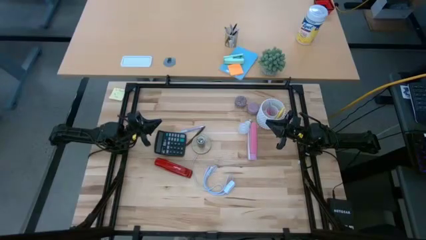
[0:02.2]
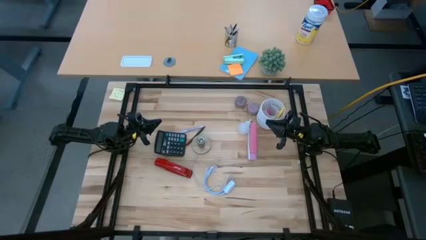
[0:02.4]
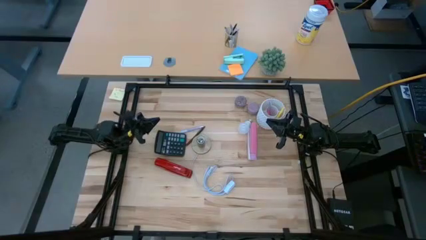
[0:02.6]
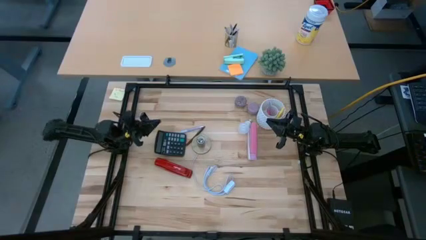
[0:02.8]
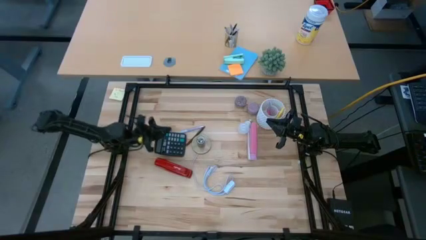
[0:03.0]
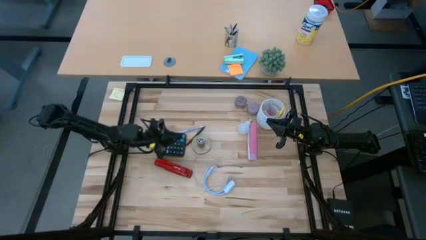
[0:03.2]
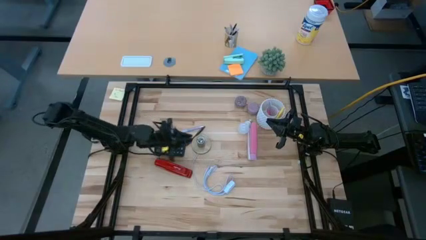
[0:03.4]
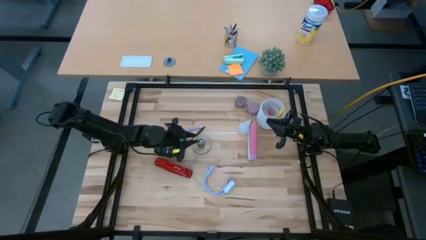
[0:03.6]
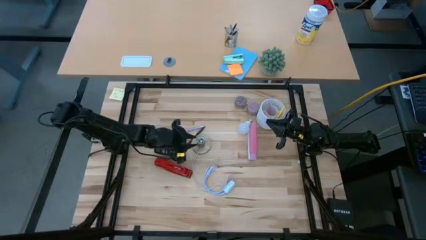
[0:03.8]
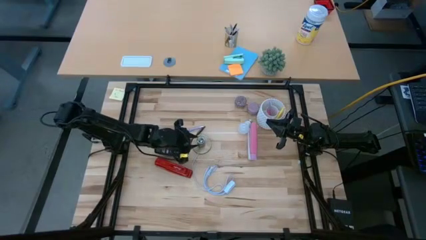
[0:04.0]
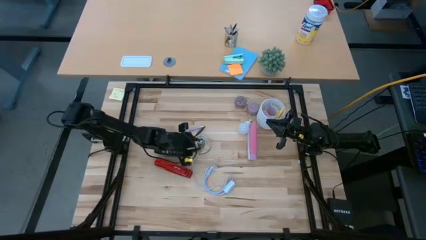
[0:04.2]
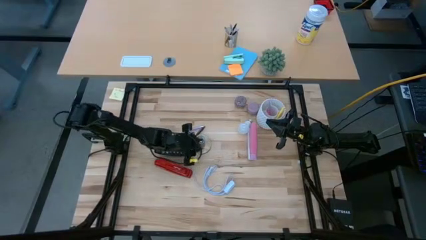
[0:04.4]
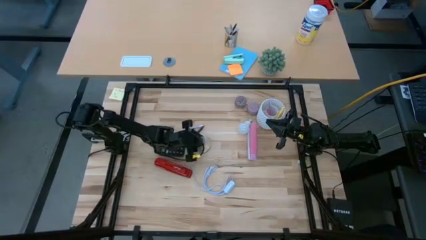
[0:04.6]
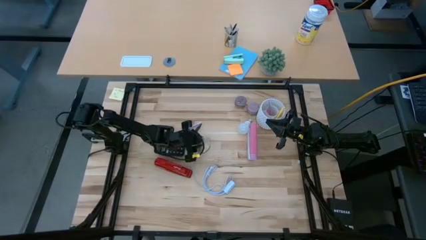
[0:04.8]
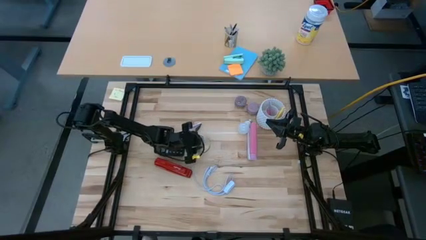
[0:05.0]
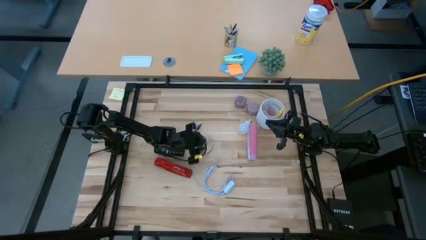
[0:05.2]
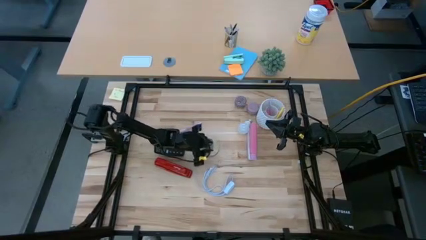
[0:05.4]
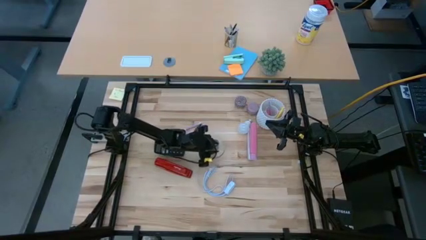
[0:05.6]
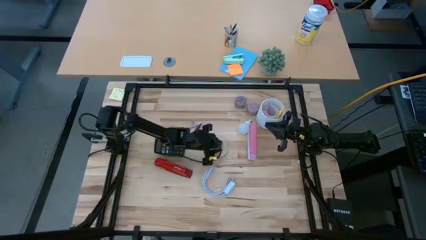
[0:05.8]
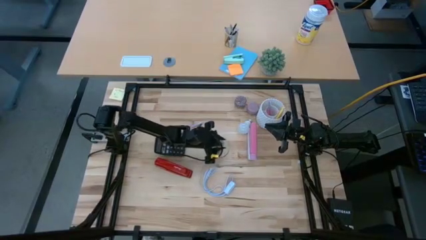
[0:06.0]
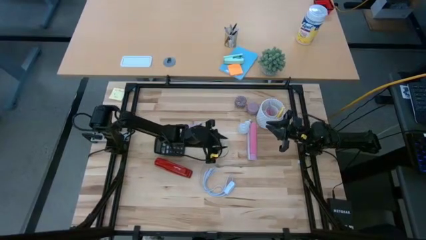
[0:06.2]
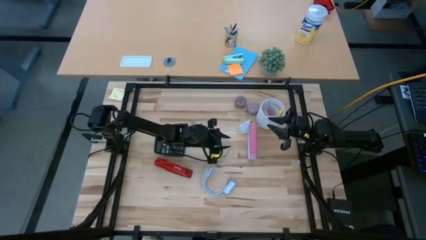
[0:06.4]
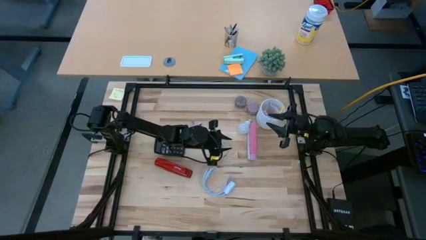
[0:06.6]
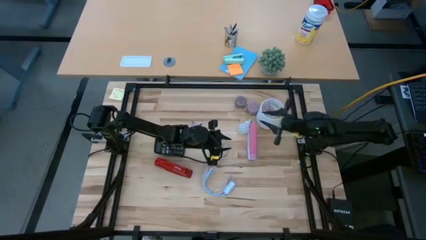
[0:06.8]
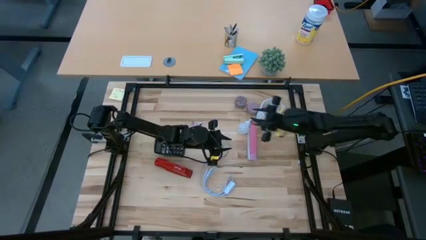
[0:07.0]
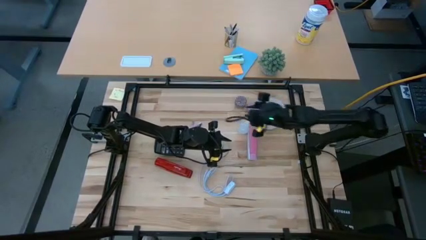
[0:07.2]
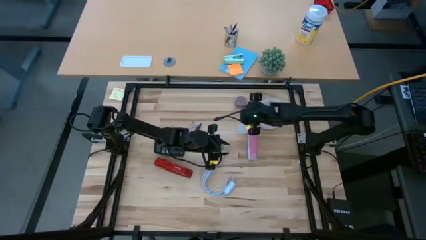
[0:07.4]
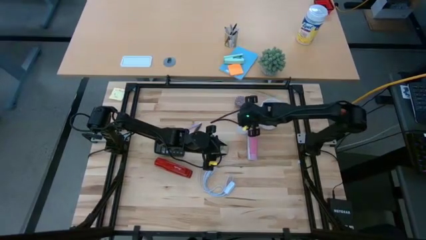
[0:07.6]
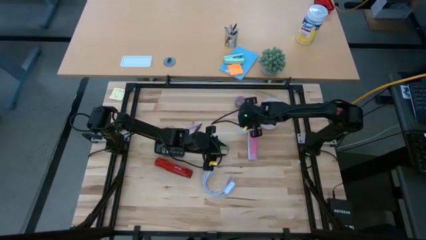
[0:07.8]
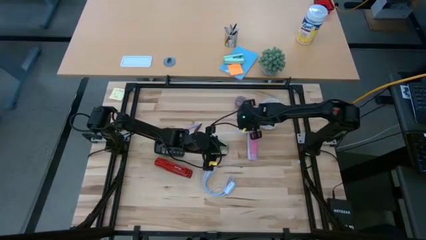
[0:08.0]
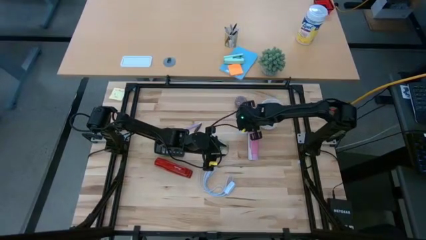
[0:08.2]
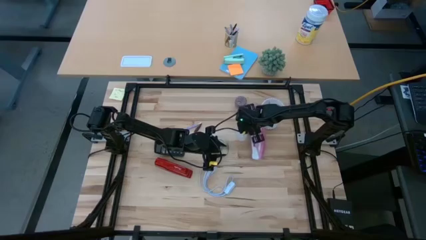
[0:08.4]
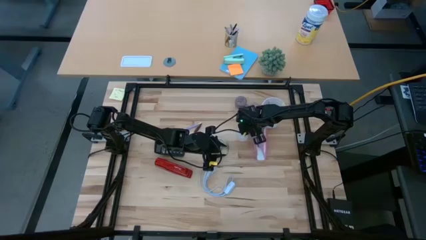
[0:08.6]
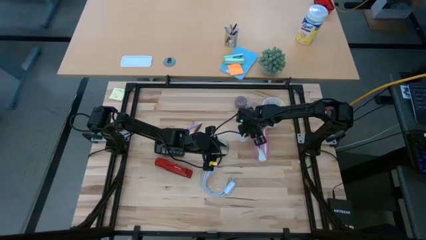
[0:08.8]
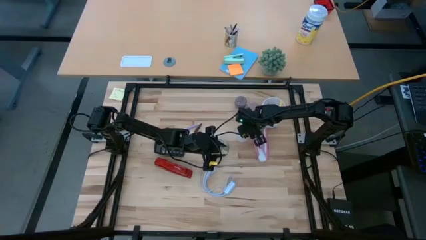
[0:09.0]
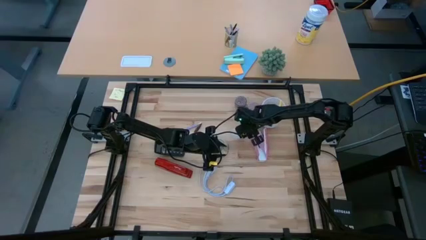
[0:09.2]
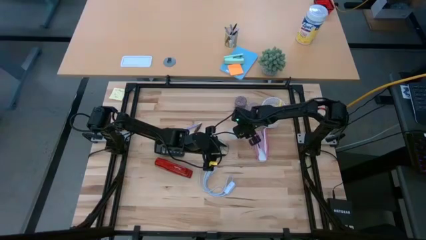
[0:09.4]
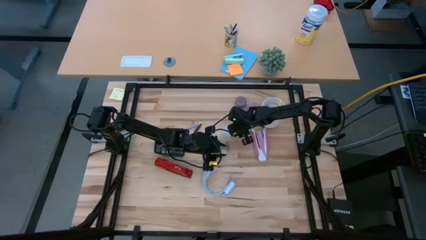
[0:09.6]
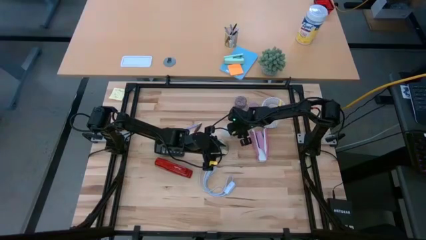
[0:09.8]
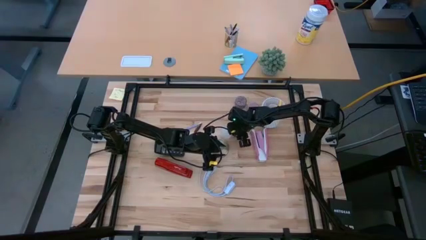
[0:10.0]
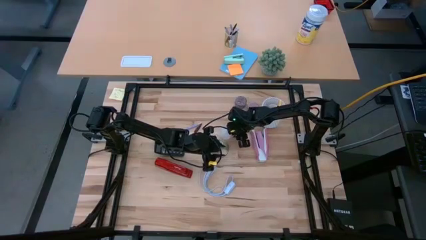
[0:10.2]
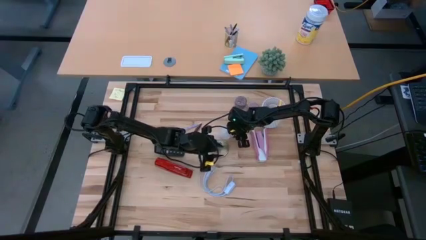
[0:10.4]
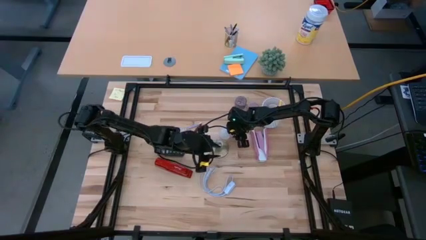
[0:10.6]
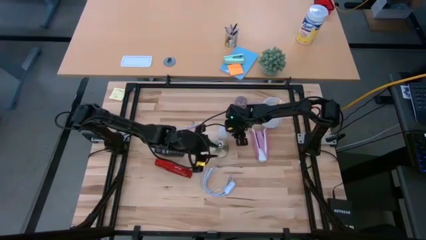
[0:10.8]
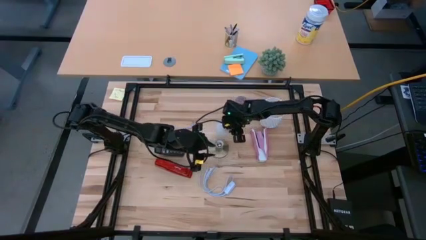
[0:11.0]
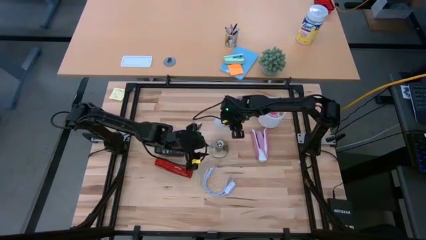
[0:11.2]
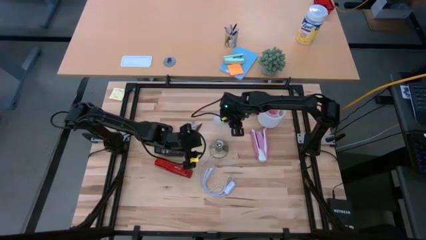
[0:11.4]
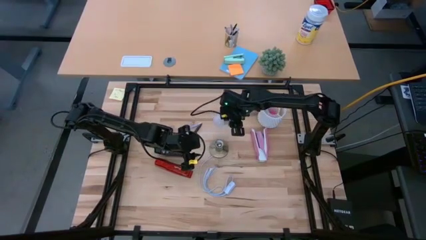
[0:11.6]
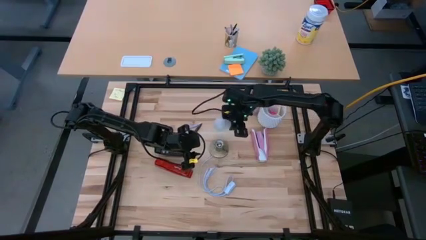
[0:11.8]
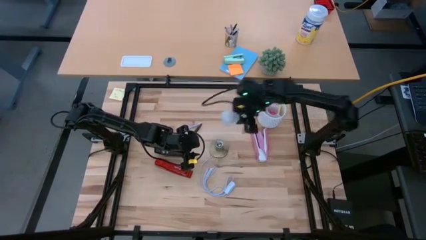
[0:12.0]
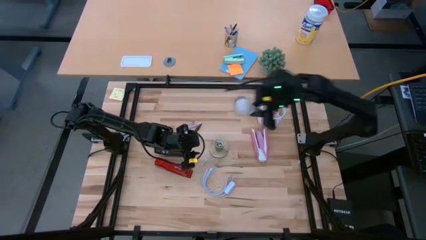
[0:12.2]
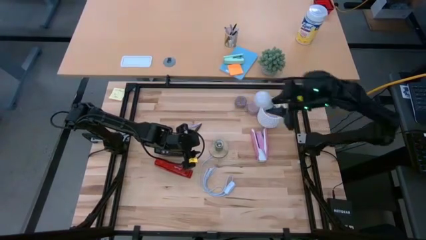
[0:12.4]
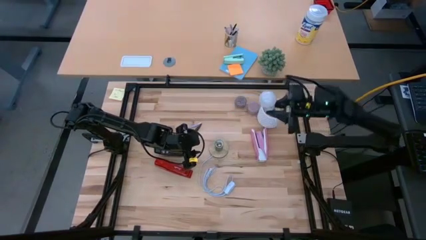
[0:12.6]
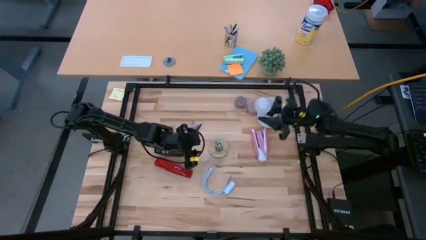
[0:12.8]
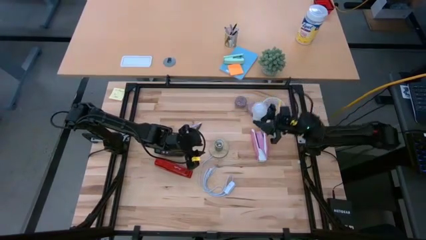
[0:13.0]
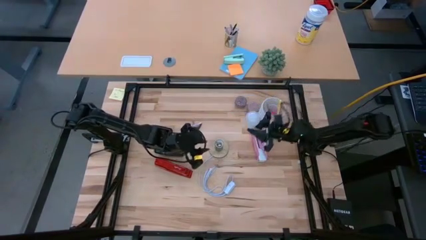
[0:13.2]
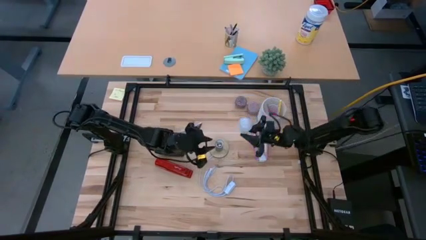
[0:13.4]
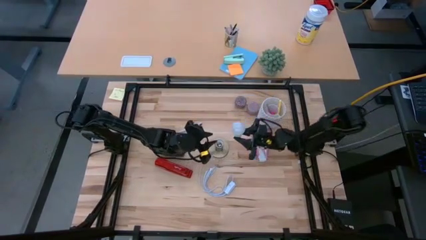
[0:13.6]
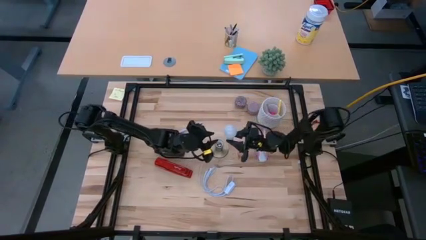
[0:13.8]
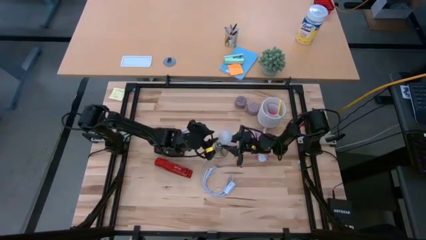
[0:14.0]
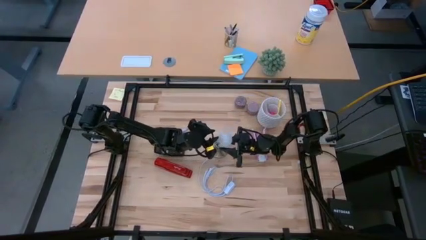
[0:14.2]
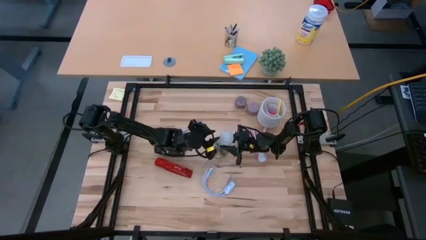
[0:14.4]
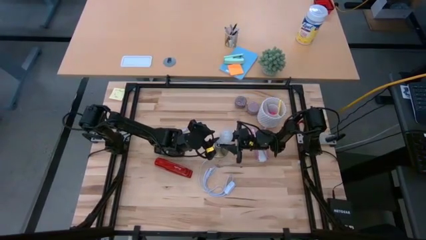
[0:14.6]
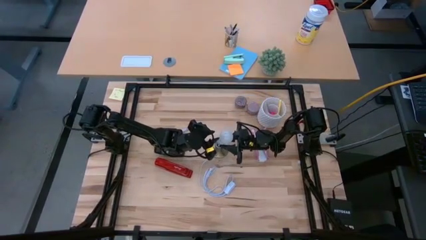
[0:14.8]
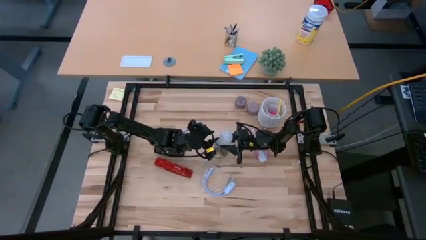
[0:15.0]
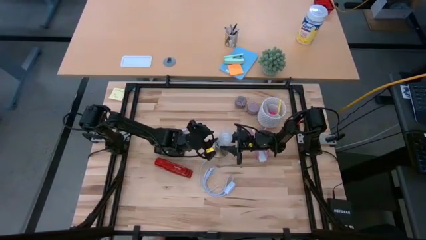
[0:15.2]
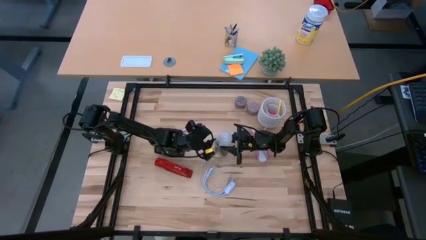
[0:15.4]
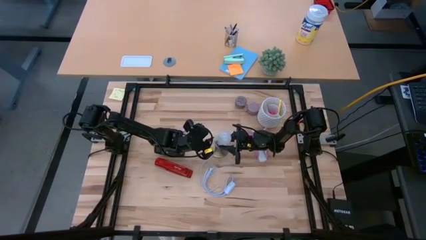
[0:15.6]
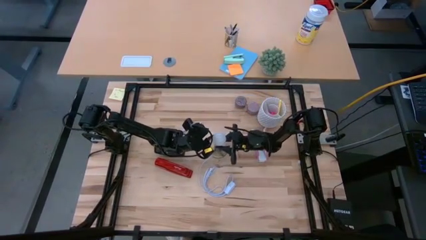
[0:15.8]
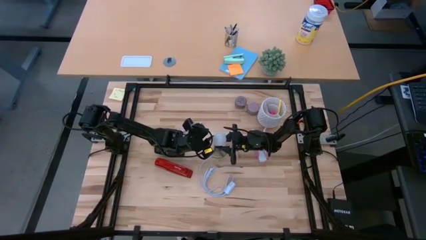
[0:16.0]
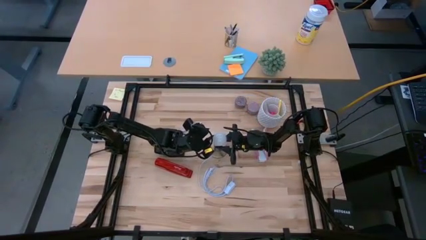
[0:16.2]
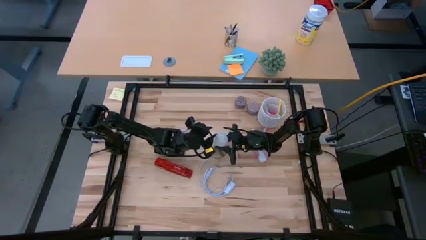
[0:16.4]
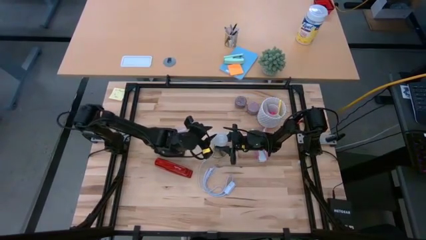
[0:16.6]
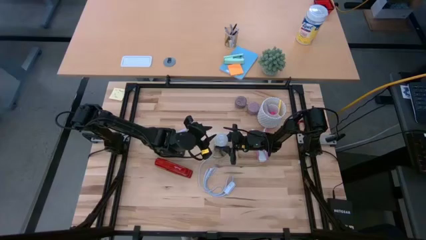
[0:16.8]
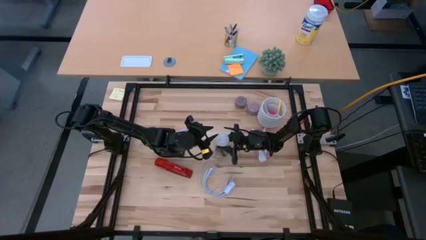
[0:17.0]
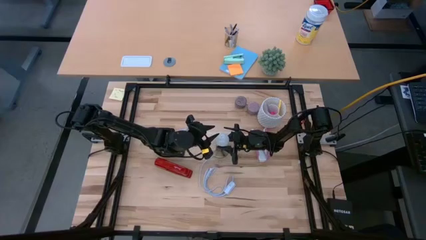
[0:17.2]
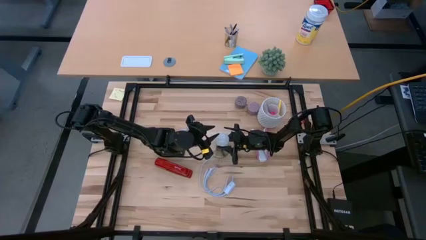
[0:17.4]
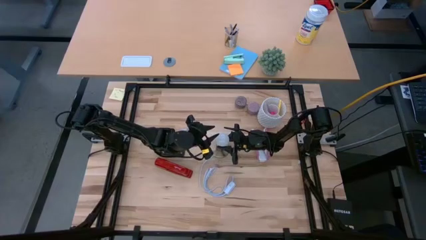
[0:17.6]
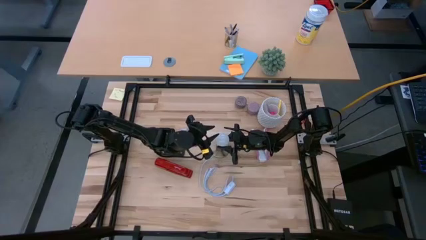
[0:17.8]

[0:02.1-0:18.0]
Task: Screw lightbulb
Insert the white lightbulb into the golden lamp
